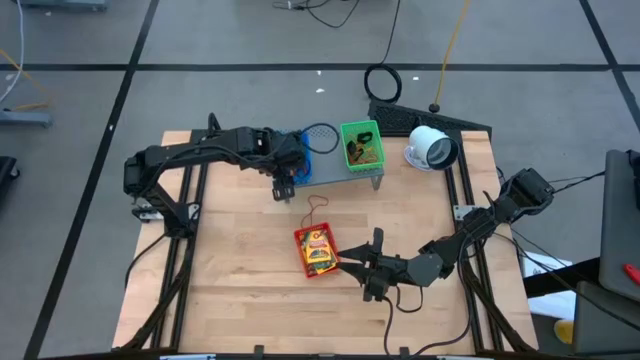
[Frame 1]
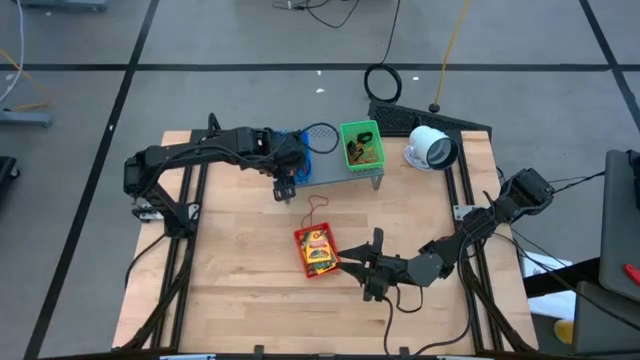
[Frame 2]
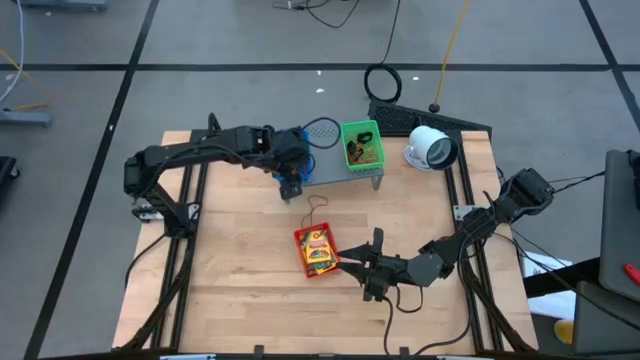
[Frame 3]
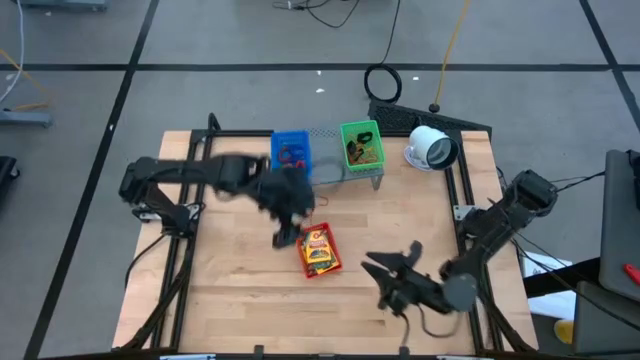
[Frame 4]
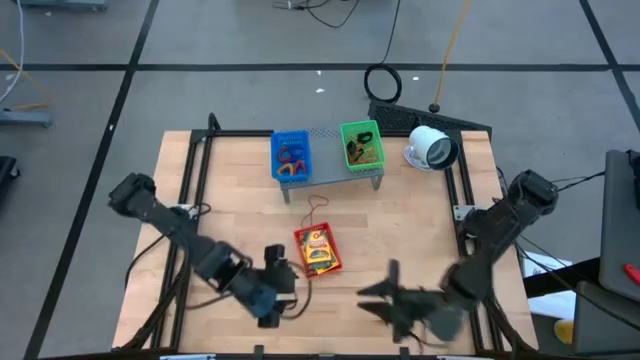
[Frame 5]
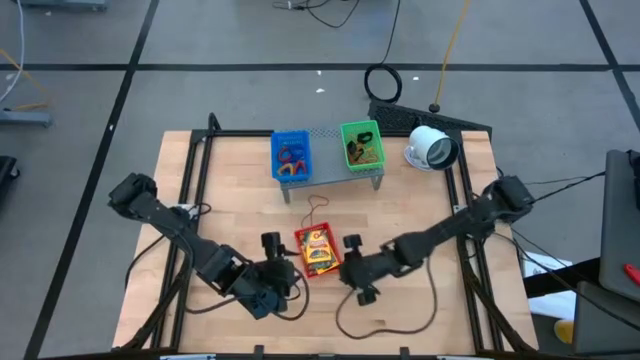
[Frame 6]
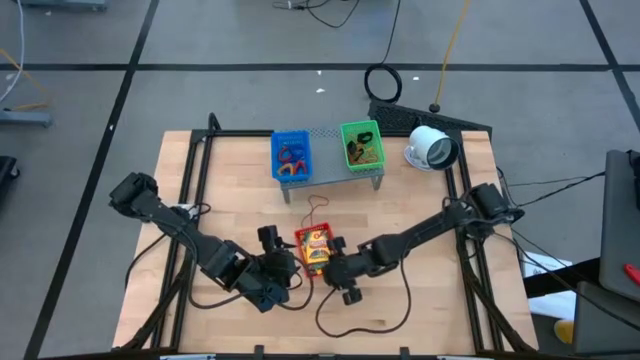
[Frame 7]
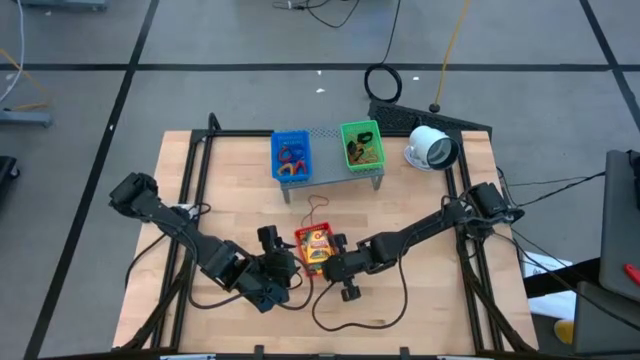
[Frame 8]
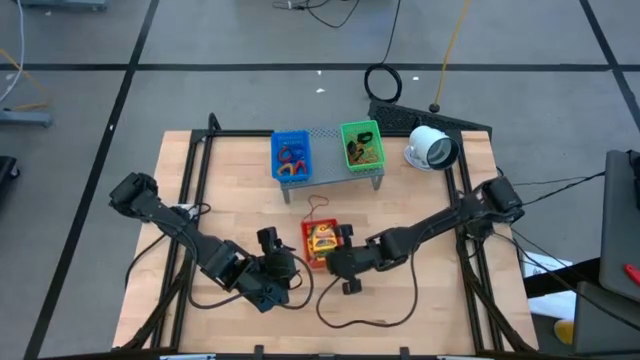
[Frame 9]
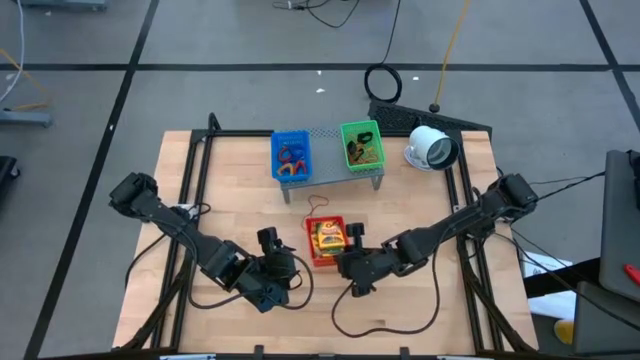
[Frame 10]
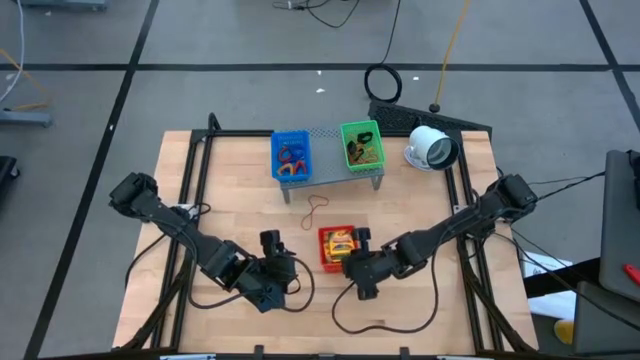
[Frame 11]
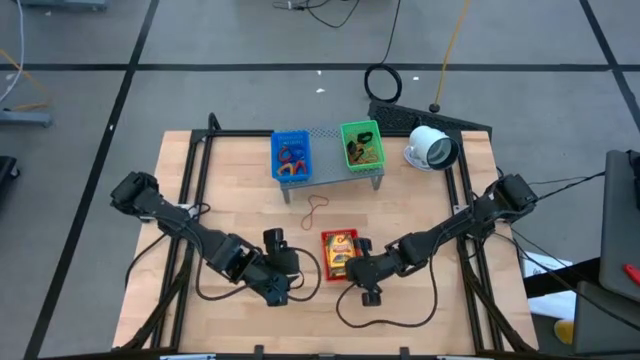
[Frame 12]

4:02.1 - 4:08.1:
Task: Pick & Place Office Desk Supplies
Put the red bin on the shelf

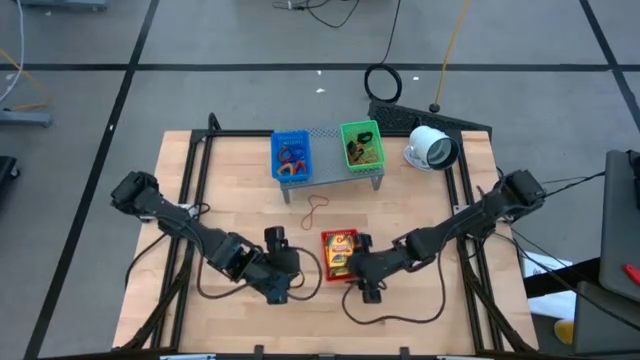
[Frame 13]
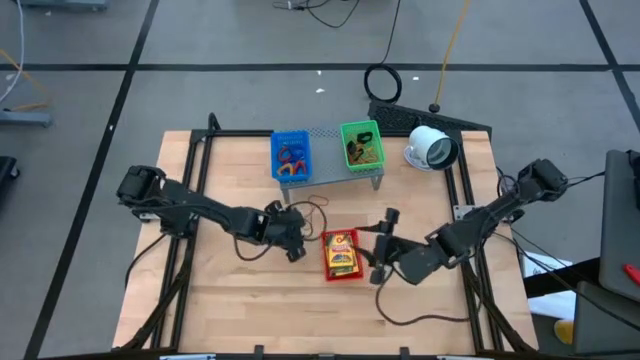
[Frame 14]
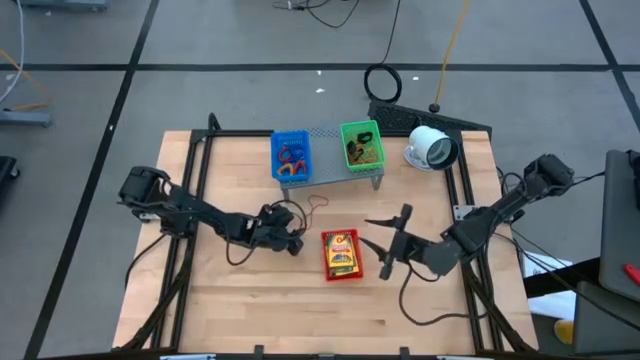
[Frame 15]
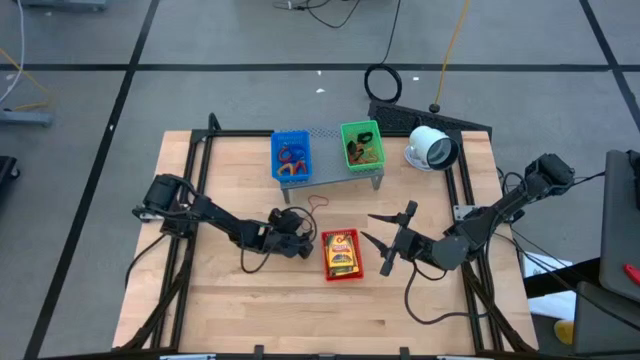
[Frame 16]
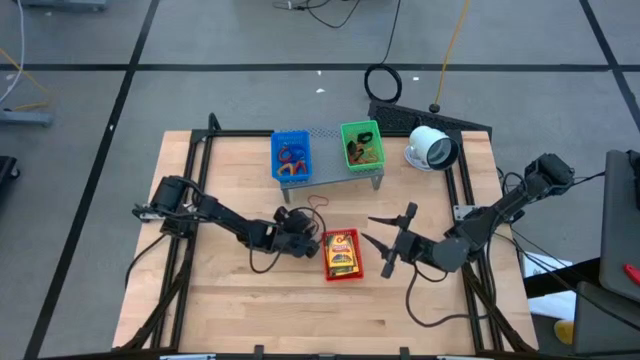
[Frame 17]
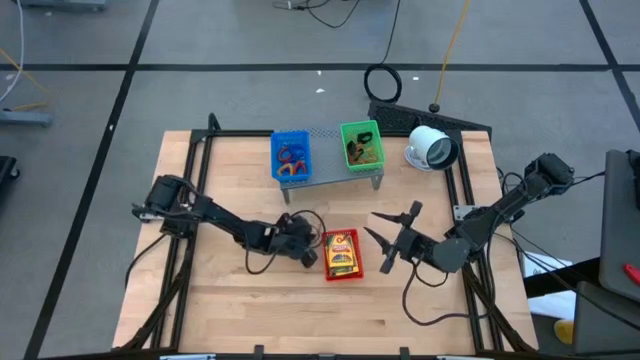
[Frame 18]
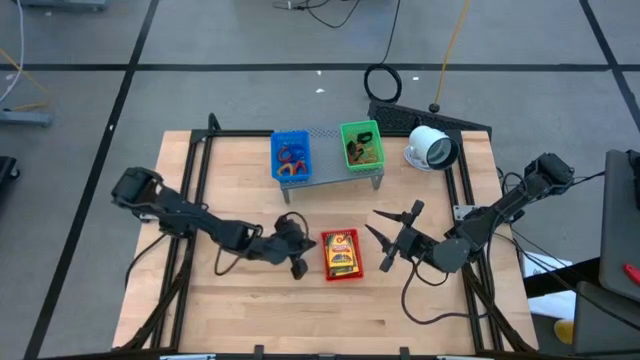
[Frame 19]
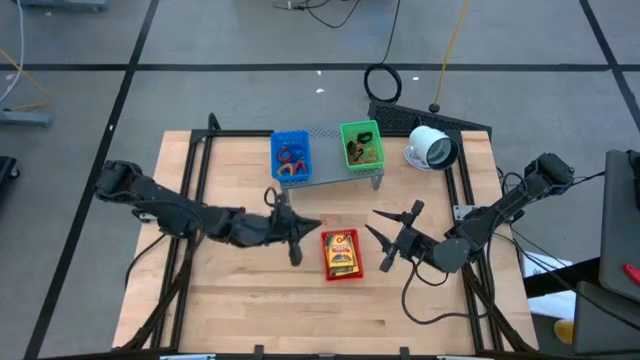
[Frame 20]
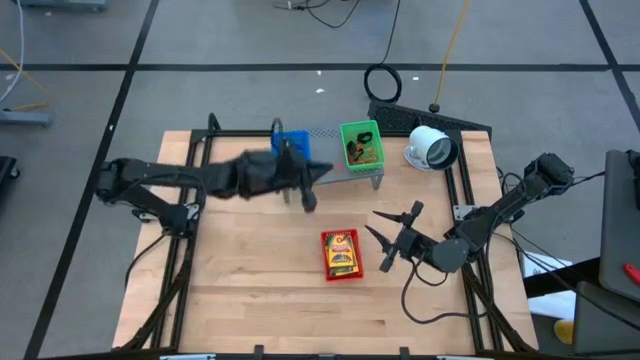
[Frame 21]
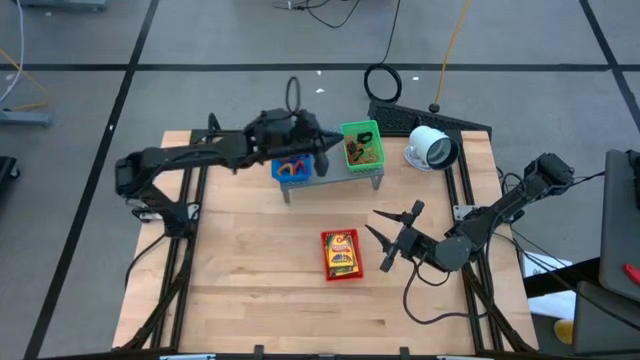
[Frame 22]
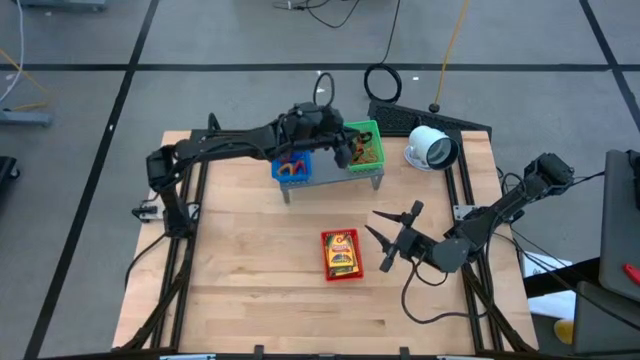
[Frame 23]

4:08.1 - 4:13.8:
Put the red rubber band into the green bin on the shelf

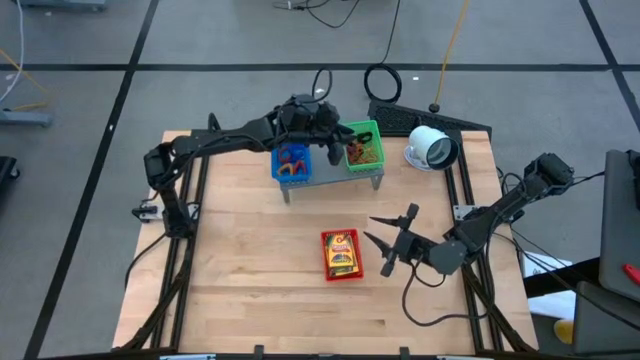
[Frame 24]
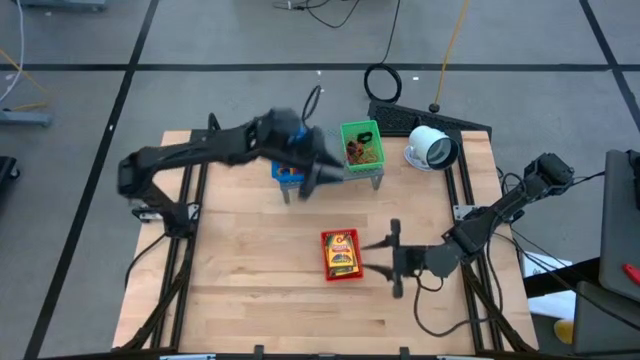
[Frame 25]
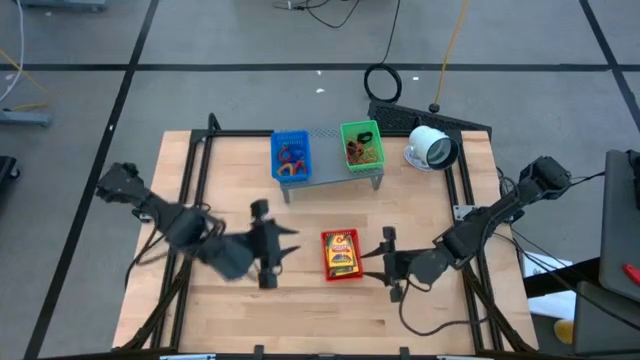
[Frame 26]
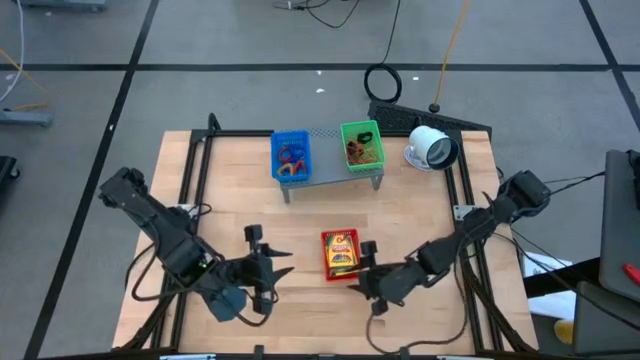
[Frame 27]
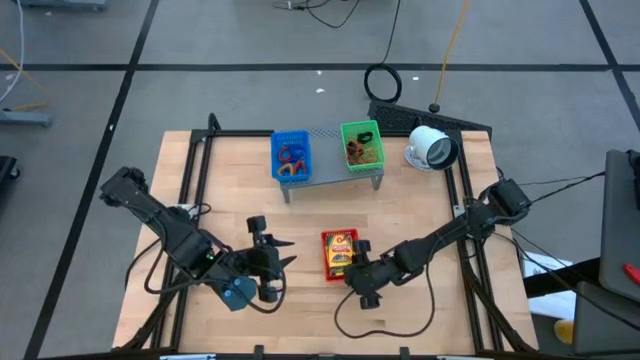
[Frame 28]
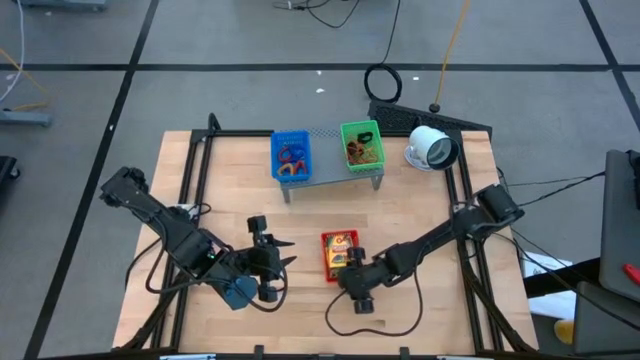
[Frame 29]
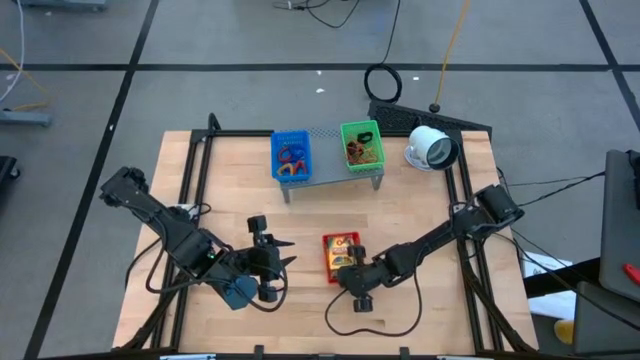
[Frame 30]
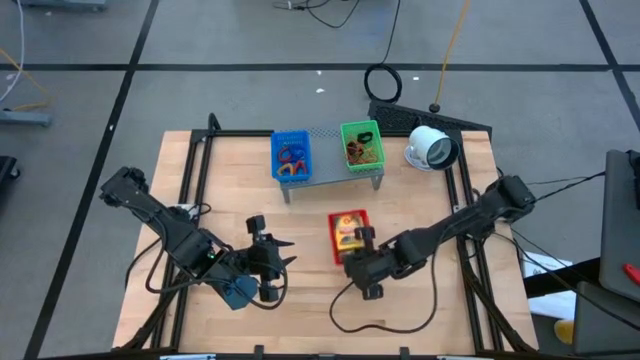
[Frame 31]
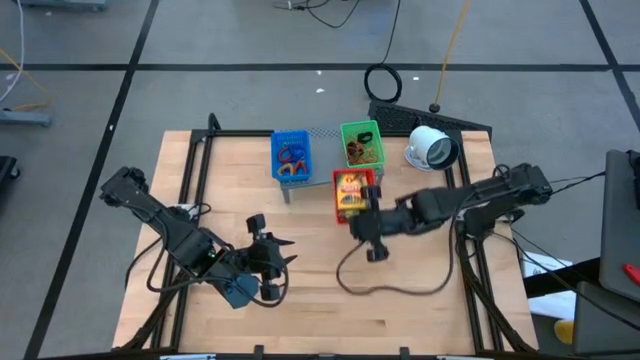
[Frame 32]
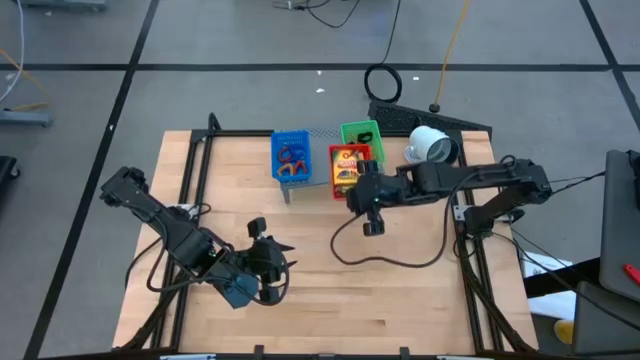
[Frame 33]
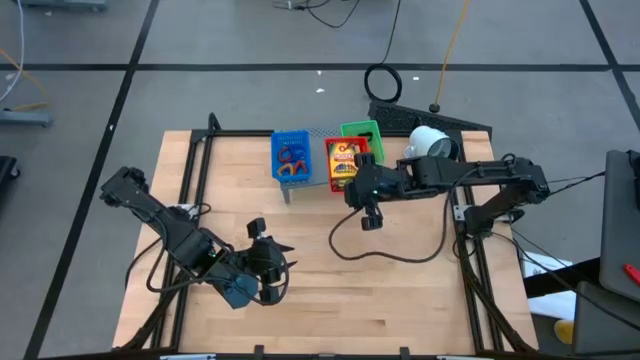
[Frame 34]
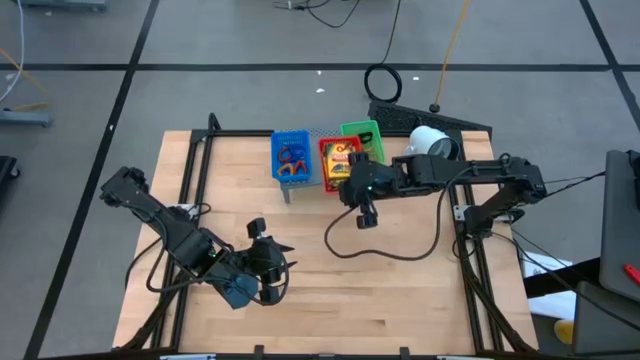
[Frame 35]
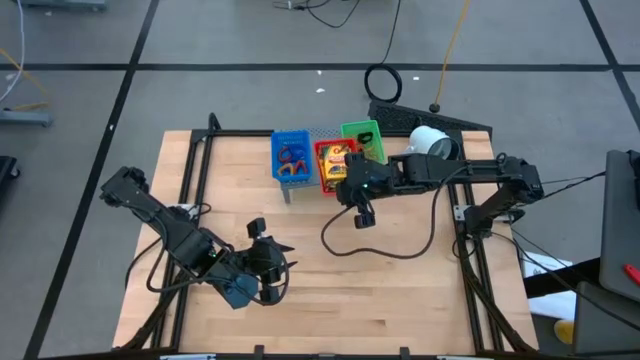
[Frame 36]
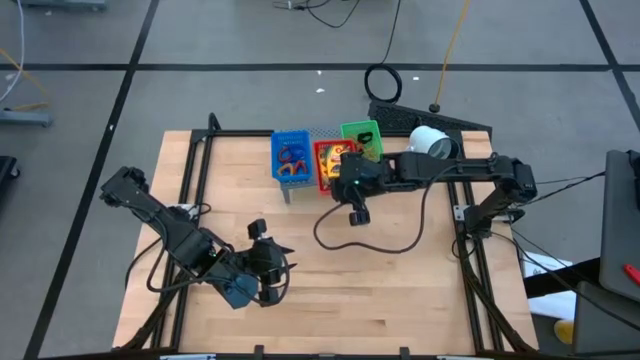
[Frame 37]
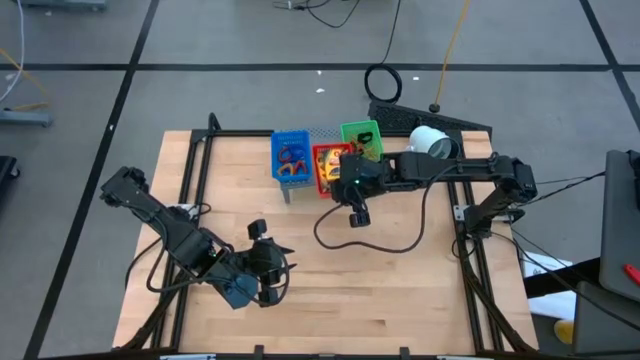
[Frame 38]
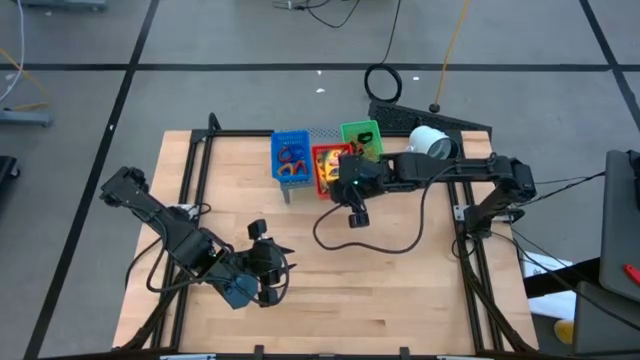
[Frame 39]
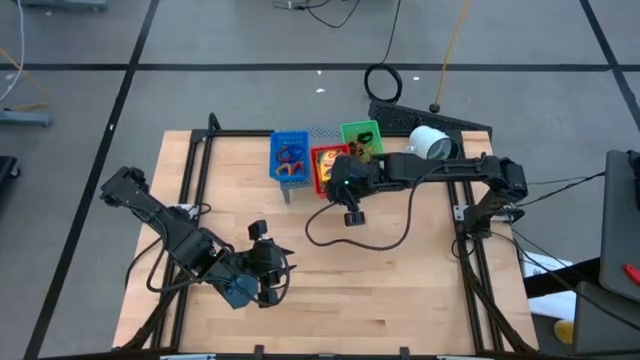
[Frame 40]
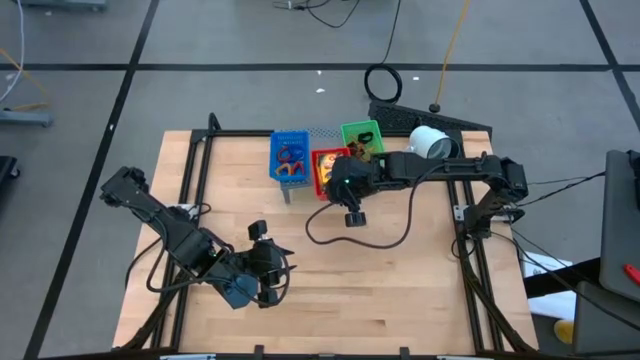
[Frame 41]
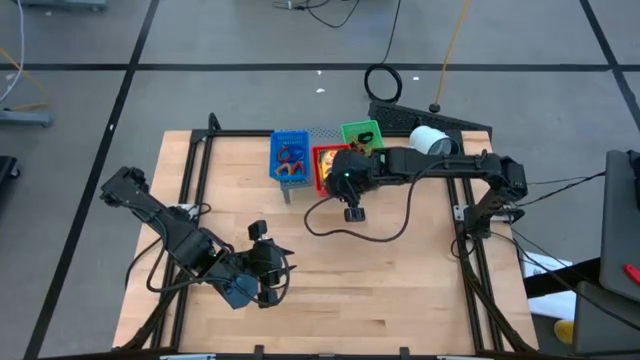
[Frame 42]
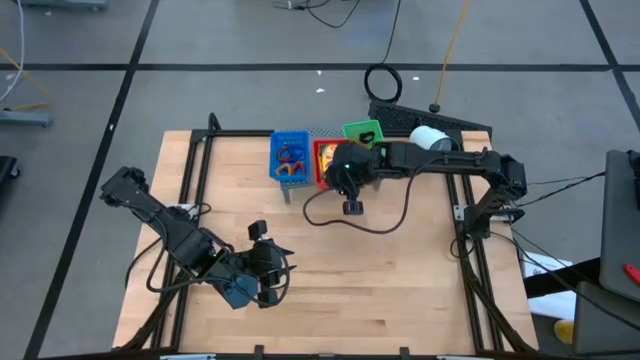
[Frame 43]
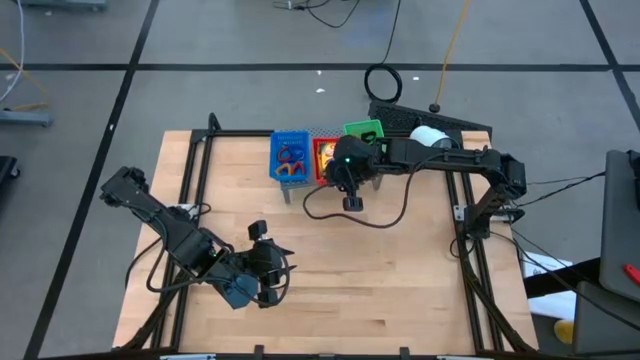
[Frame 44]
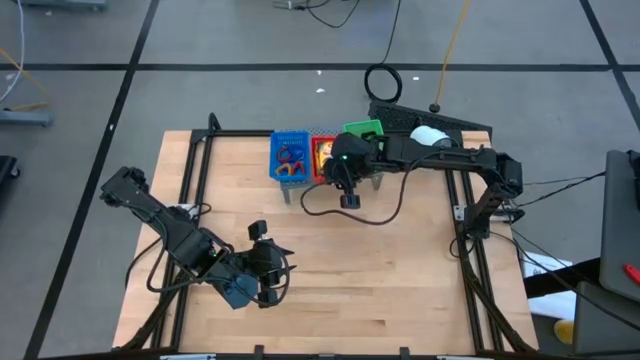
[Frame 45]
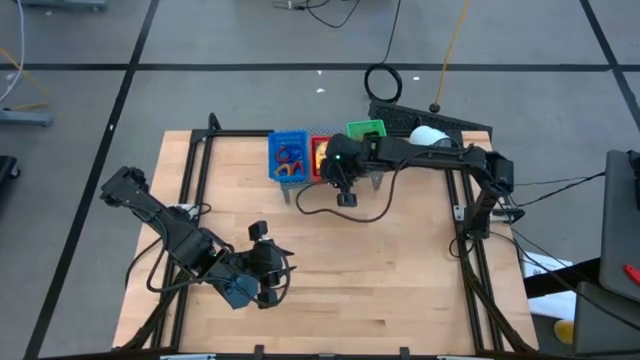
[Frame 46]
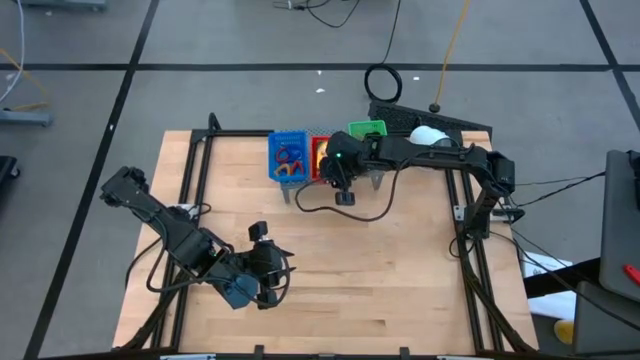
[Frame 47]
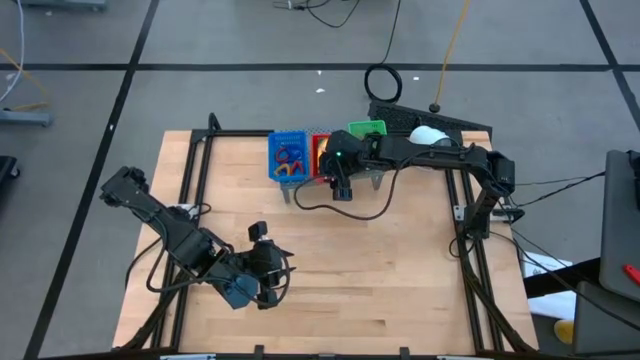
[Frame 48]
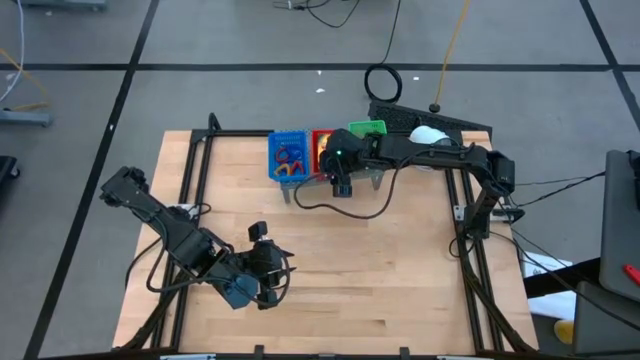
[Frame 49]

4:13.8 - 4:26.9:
Put the red bin on the shelf
